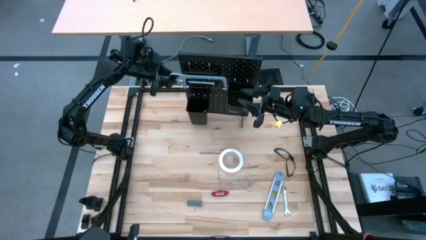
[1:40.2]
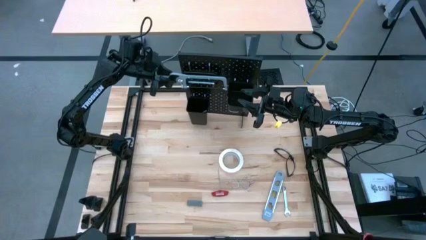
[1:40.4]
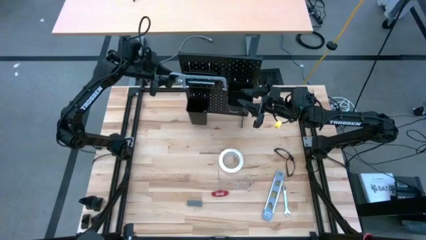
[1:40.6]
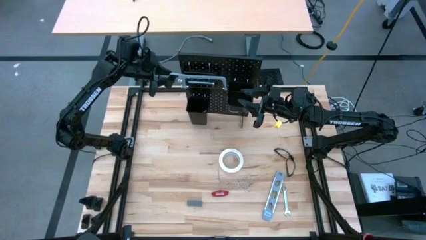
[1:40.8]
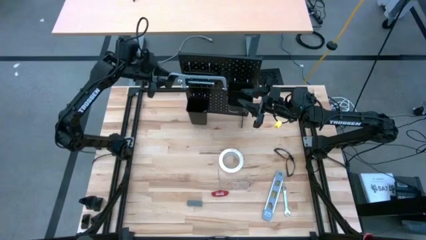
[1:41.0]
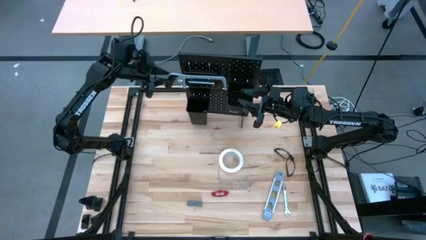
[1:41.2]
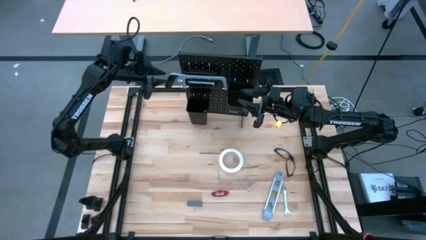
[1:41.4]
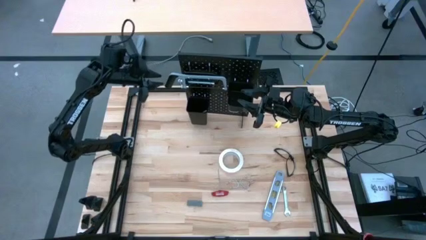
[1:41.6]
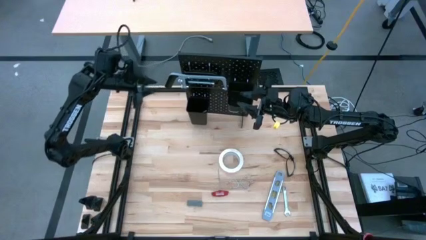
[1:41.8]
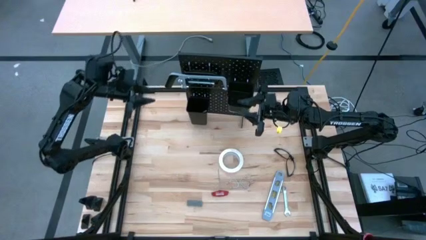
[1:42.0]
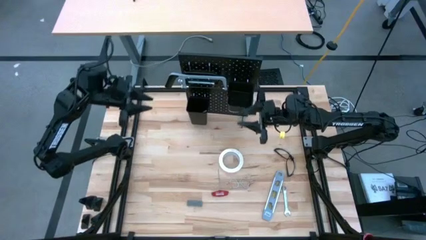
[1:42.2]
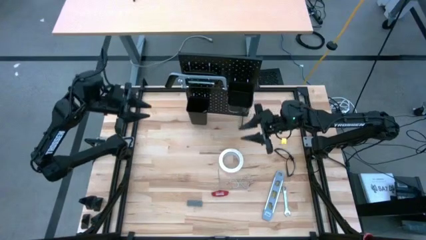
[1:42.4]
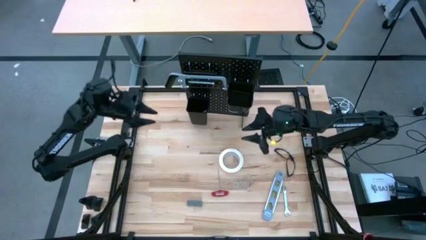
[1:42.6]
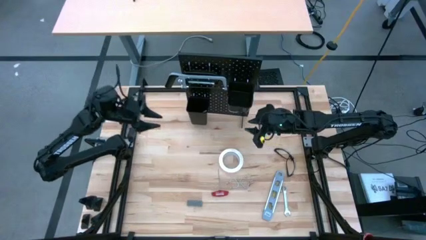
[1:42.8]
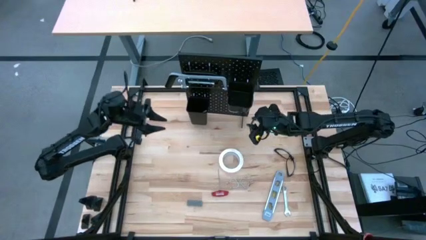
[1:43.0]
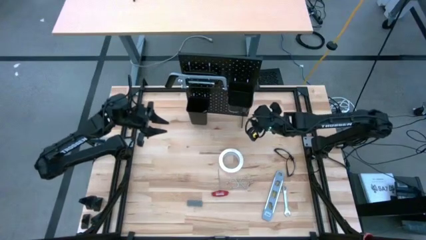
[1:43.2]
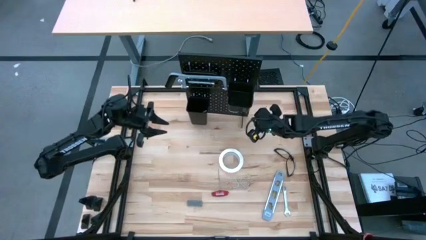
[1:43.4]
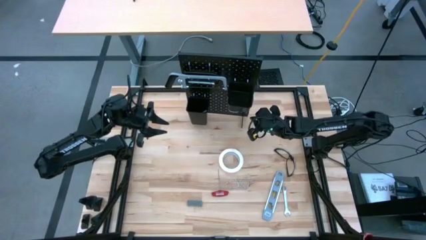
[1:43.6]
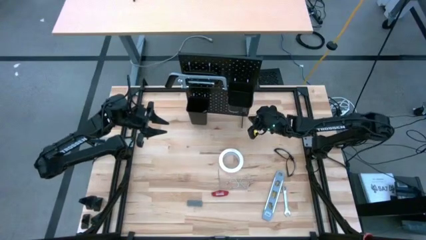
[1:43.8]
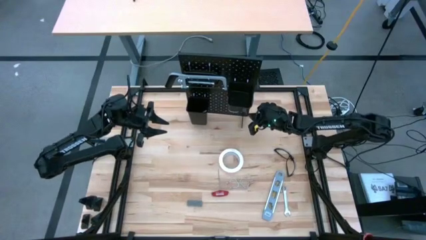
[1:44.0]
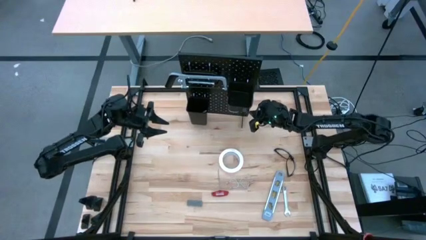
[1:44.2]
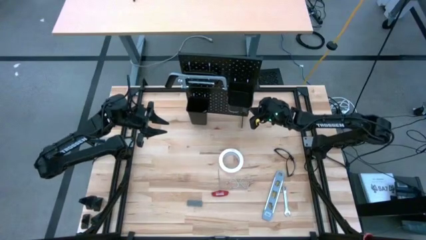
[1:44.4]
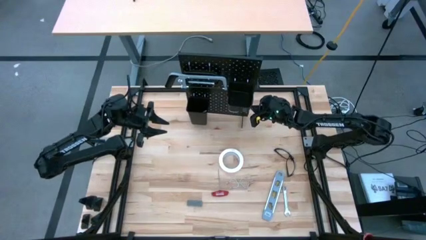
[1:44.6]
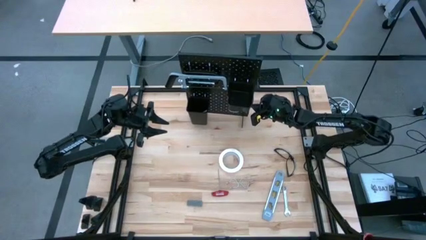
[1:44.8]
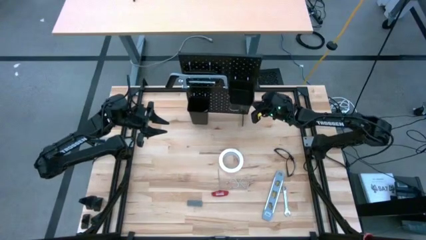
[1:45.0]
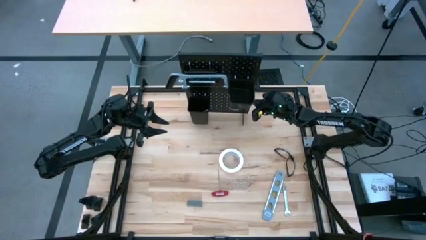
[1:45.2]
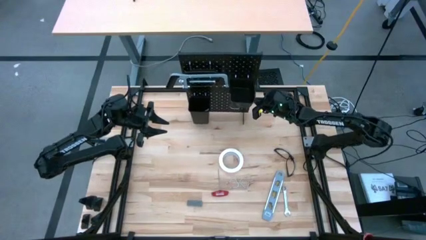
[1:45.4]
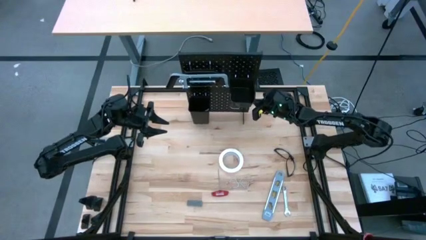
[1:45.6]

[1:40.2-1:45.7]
Task: Hang tools onto peg board
Adjust the black peg board

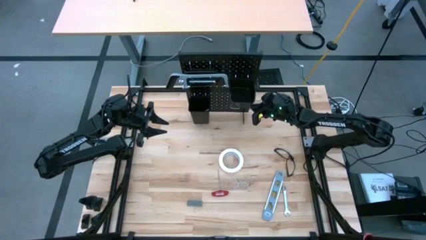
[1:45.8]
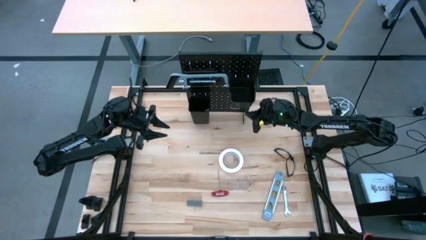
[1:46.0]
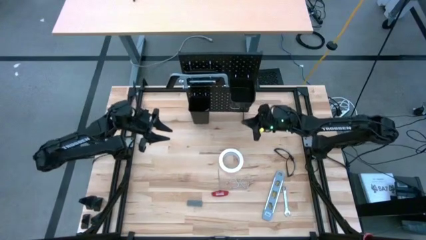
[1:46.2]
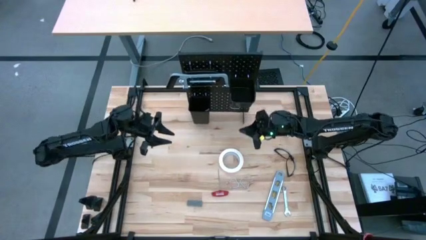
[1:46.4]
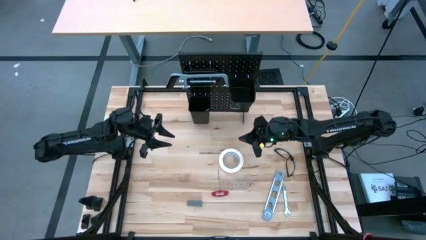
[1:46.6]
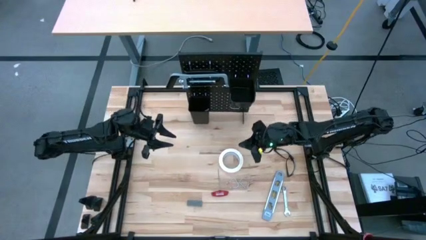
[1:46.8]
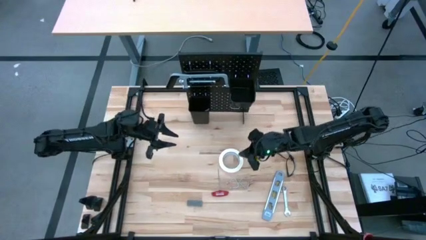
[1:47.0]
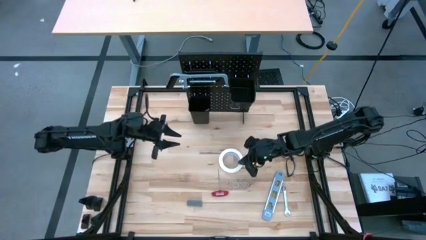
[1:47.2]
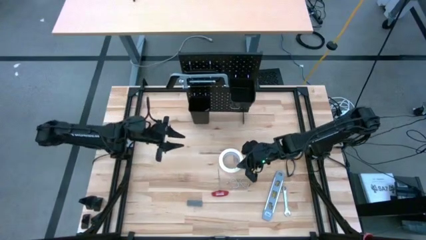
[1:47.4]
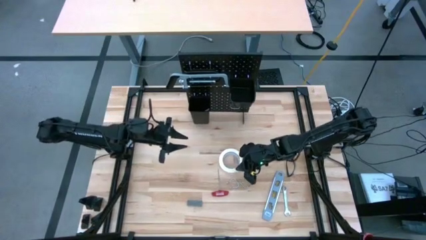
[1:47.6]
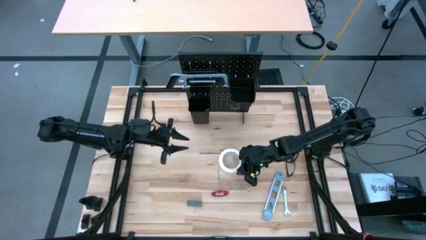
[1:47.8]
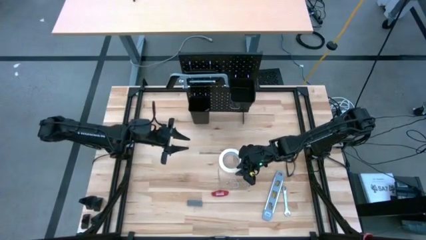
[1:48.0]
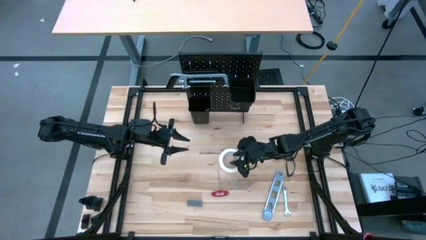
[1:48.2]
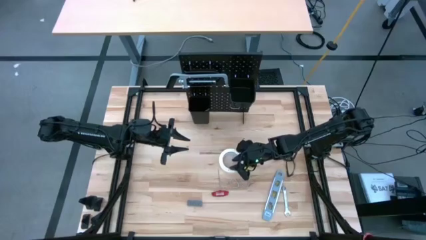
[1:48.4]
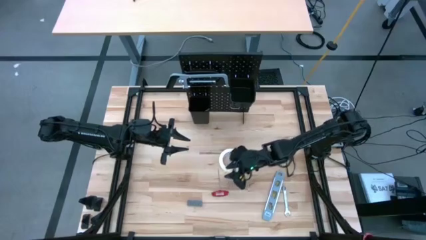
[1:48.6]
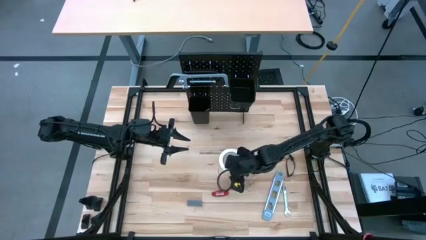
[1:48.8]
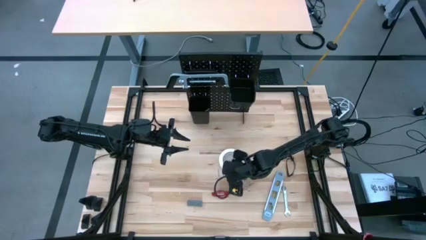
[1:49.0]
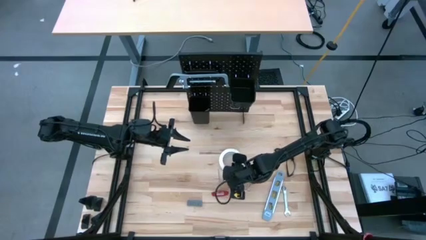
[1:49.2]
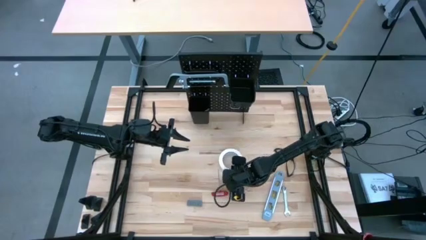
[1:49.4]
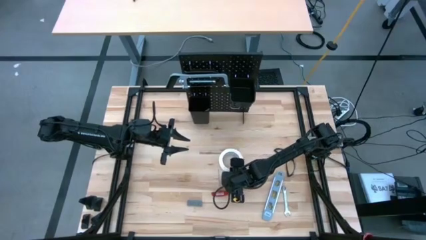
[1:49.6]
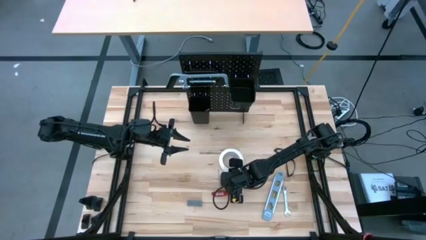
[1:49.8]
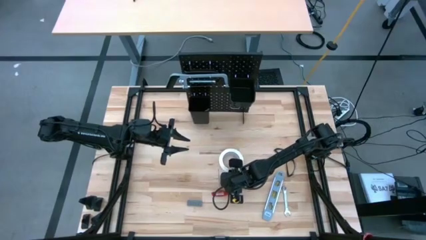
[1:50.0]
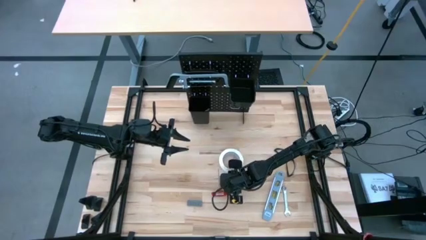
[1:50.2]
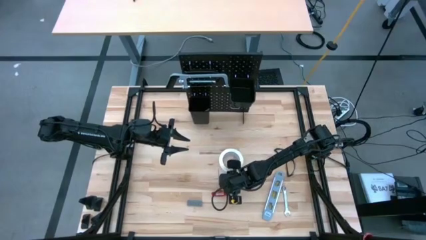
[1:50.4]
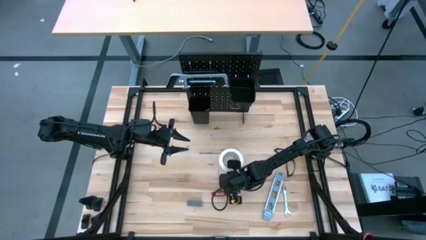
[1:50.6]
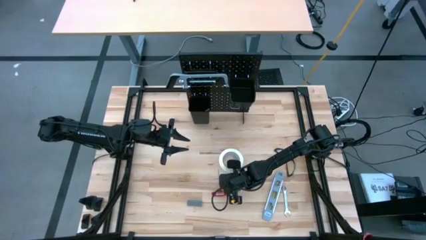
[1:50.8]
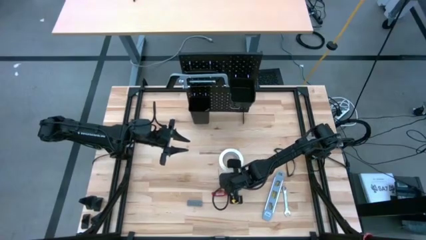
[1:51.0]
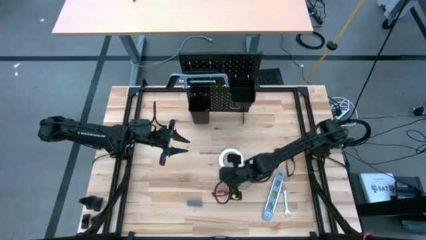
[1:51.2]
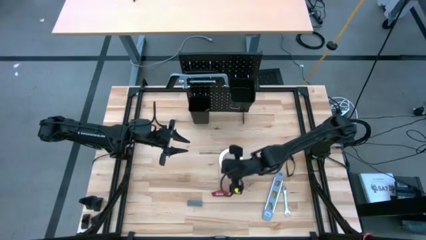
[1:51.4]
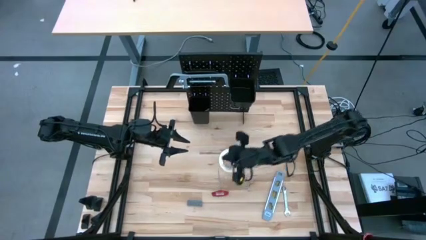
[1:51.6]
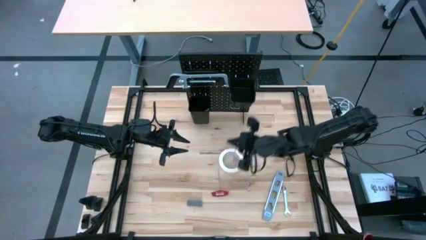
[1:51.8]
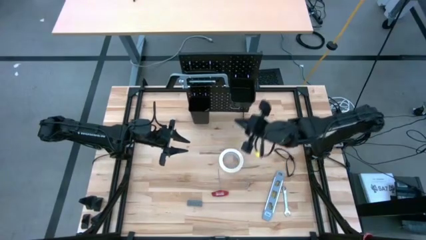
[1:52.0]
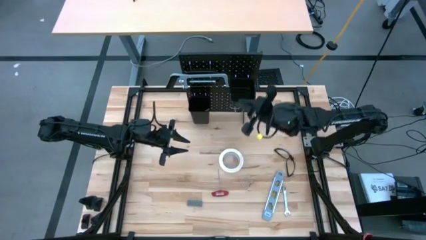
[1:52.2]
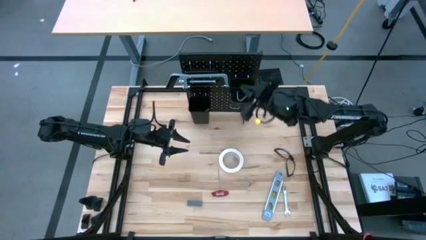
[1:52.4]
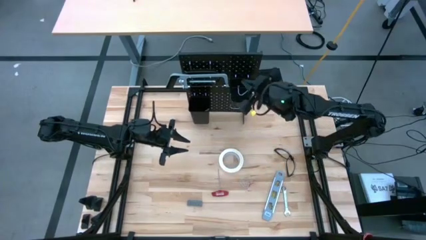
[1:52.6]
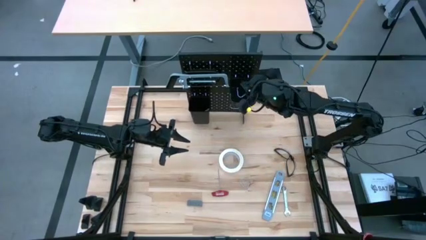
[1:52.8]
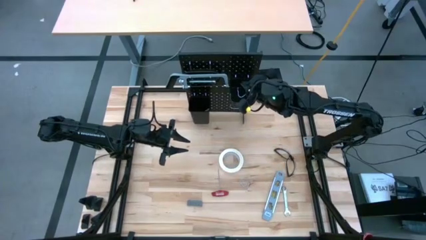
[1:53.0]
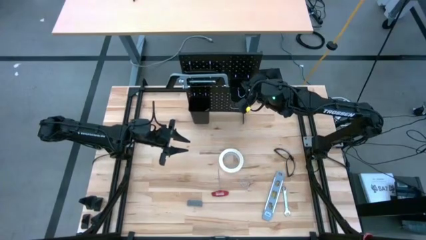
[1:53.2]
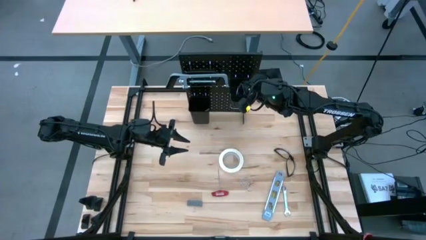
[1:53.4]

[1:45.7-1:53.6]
Put the left silver peg board hook into the right black tool bin

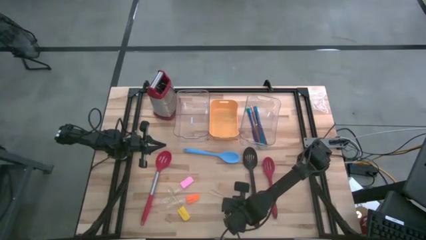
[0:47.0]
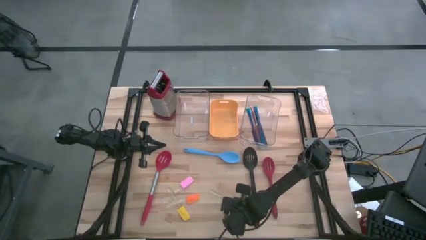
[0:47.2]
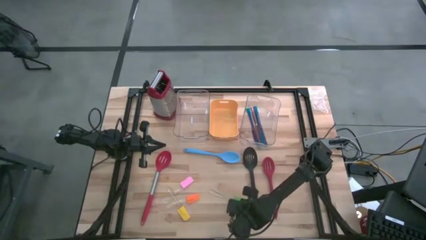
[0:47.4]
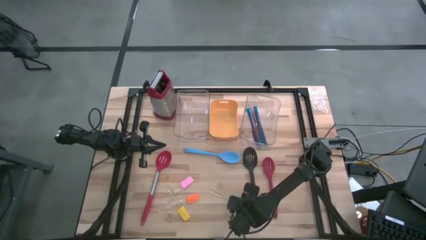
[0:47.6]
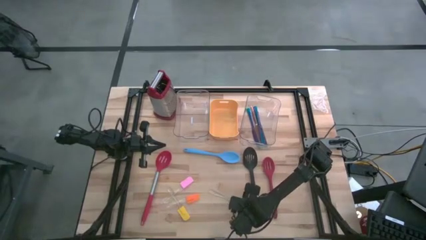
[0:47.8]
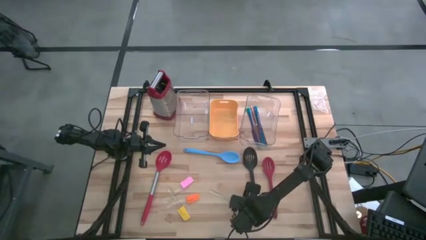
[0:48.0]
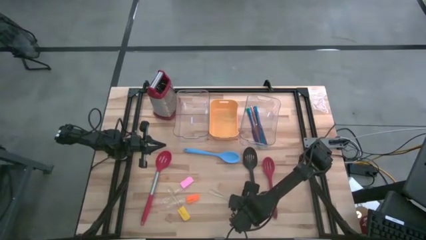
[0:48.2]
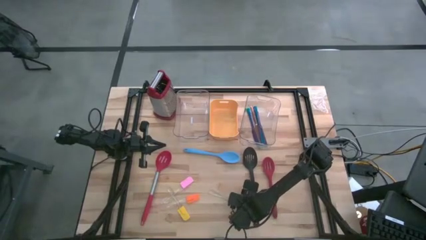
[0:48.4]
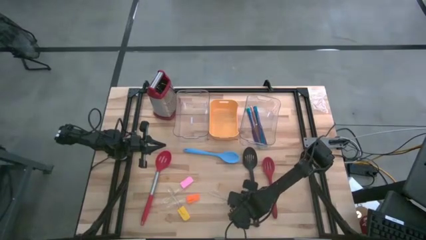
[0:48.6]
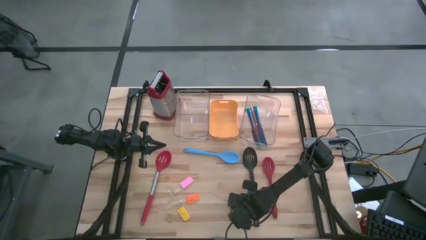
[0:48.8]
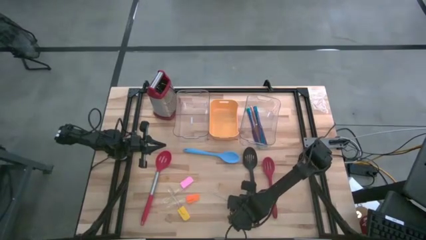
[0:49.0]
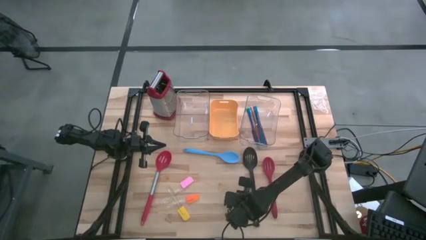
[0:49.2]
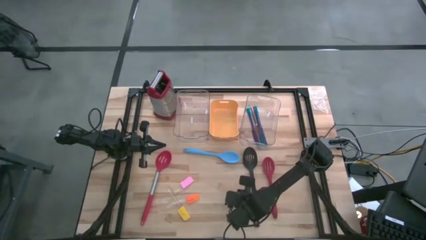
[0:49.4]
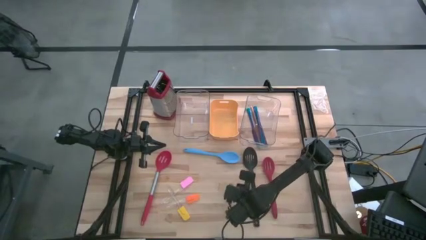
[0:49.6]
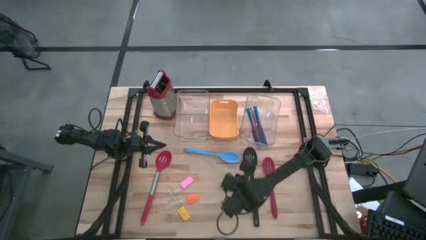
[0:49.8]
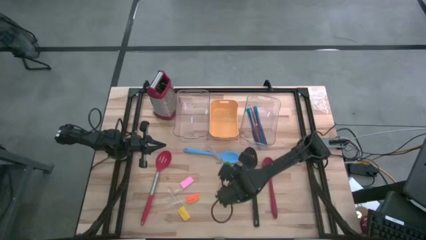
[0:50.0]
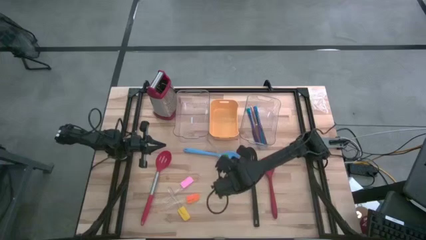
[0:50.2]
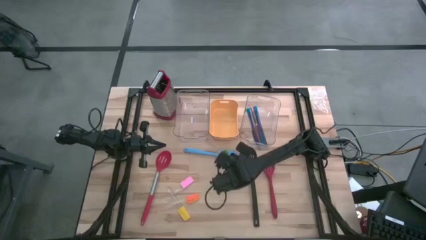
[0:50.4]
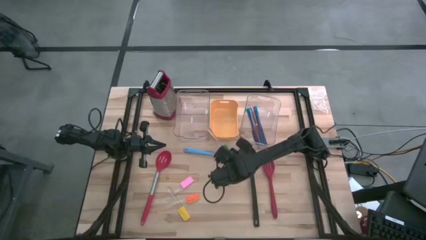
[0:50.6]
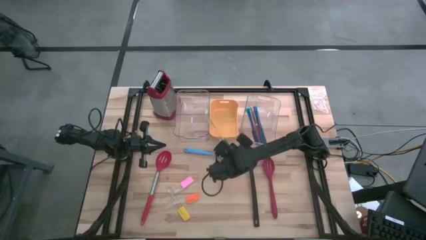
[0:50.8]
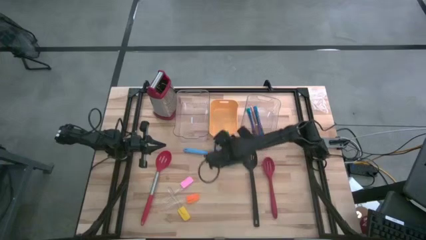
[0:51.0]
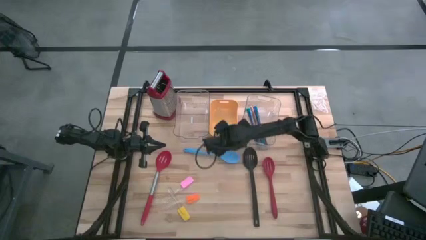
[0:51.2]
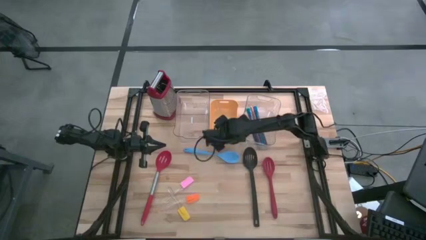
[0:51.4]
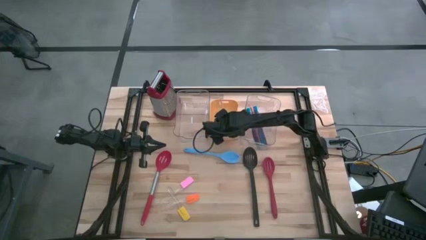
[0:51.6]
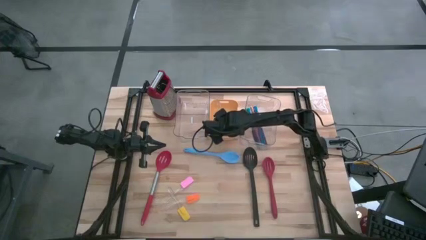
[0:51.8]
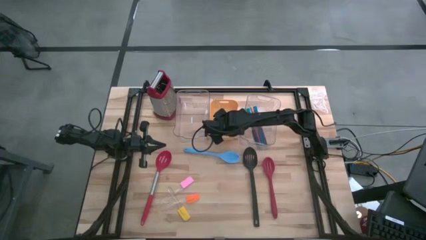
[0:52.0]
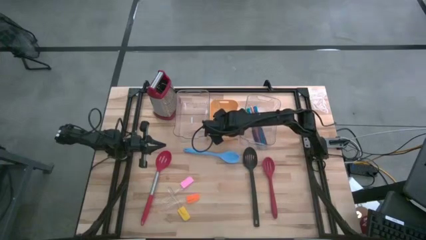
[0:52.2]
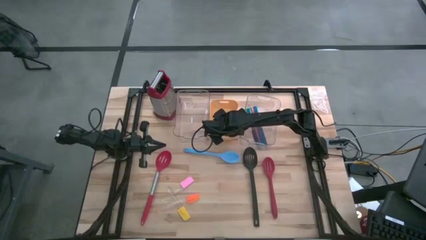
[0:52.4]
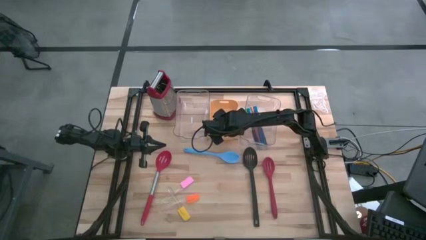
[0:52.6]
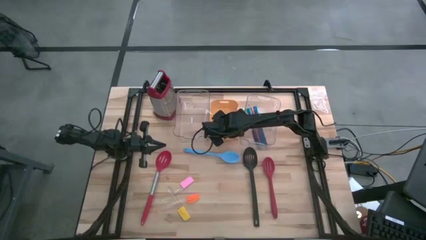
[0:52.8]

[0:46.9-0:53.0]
Task: Pick & Place Kitchen Items
Put the green spatula into the yellow bin
